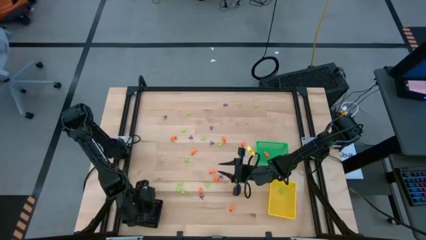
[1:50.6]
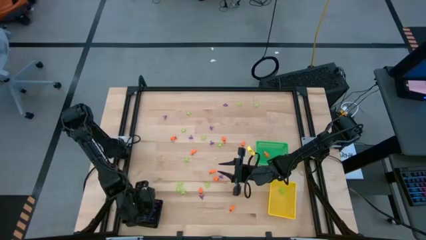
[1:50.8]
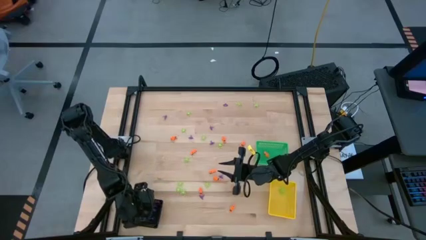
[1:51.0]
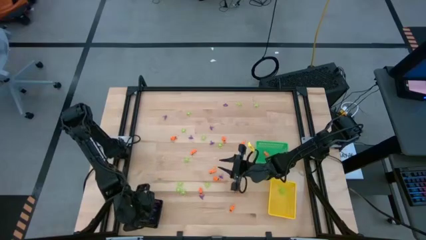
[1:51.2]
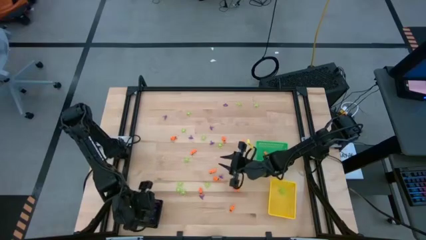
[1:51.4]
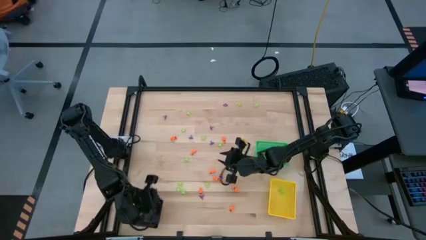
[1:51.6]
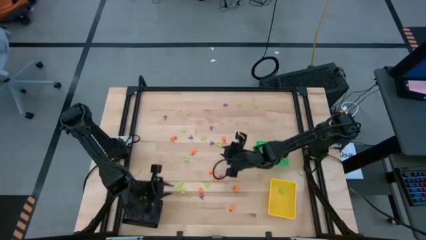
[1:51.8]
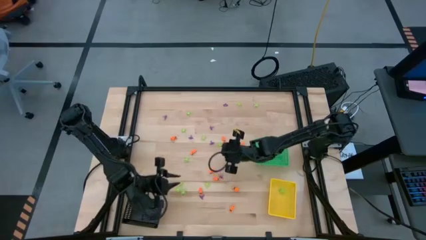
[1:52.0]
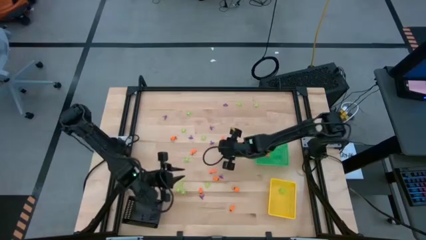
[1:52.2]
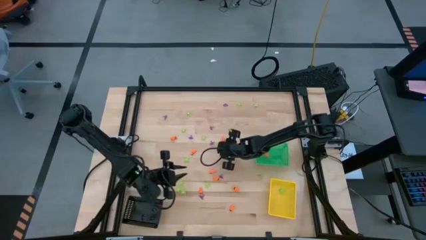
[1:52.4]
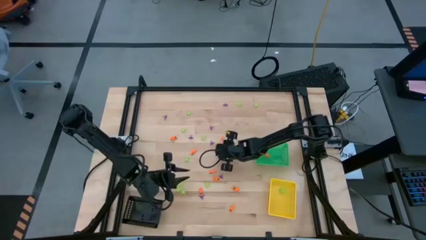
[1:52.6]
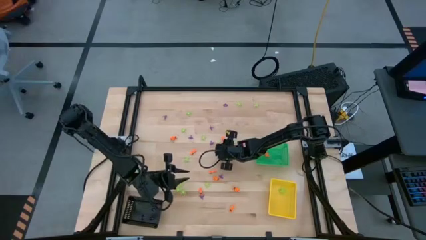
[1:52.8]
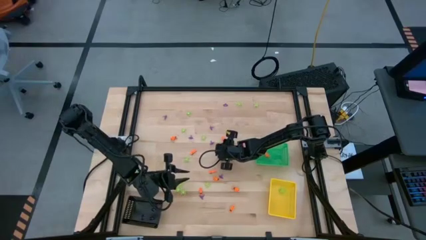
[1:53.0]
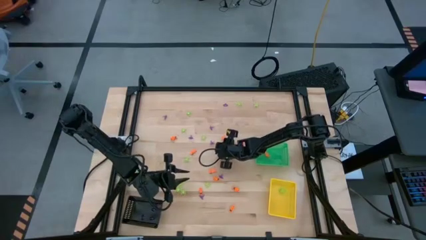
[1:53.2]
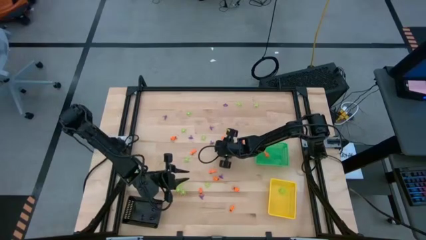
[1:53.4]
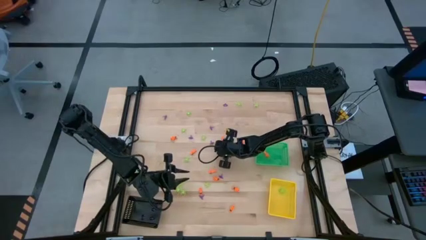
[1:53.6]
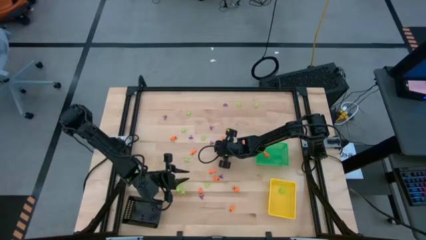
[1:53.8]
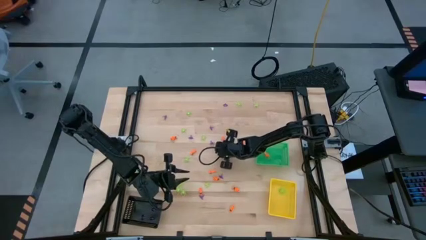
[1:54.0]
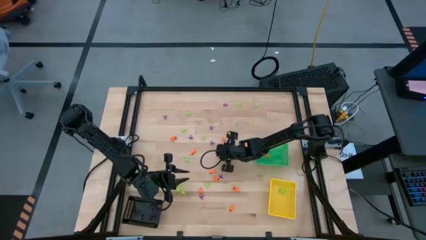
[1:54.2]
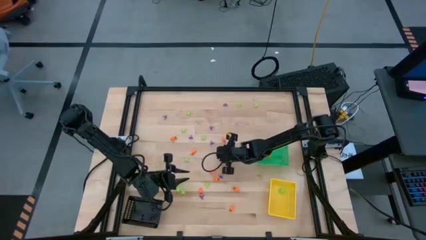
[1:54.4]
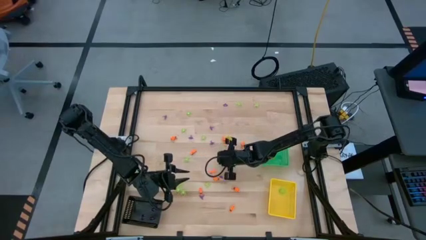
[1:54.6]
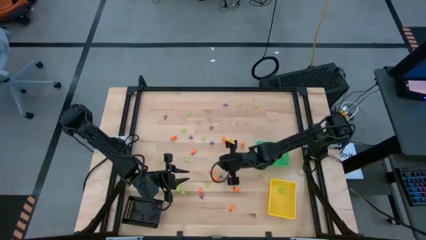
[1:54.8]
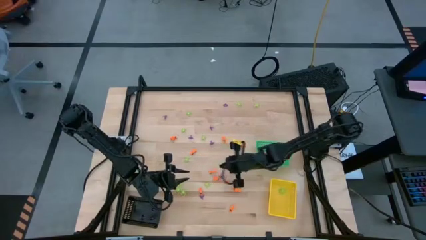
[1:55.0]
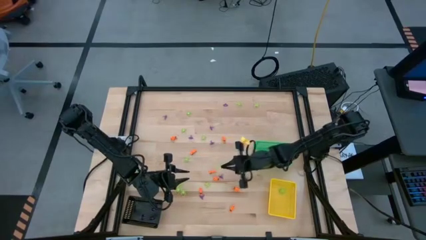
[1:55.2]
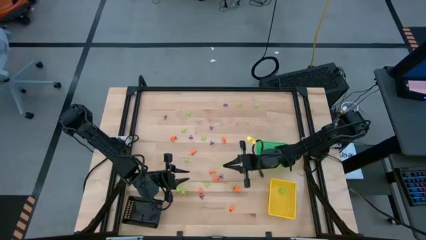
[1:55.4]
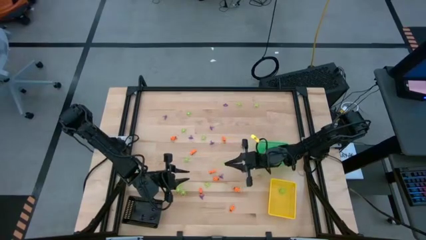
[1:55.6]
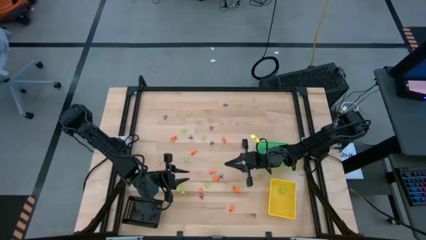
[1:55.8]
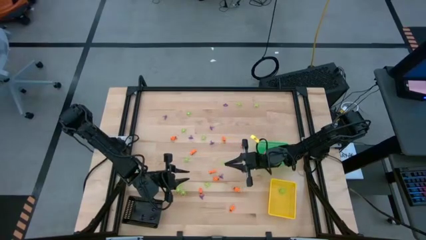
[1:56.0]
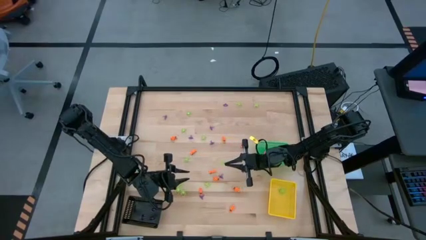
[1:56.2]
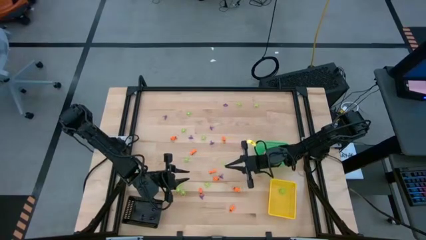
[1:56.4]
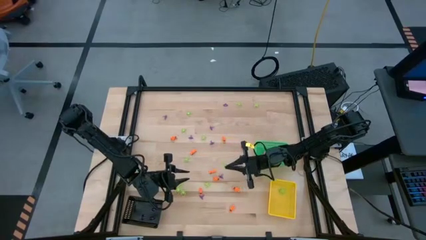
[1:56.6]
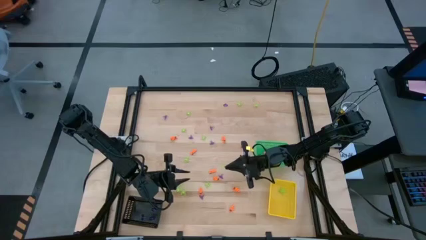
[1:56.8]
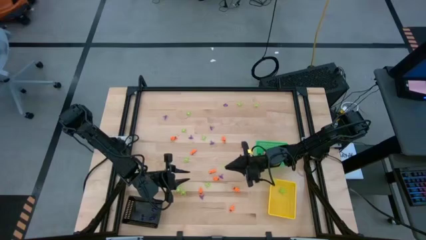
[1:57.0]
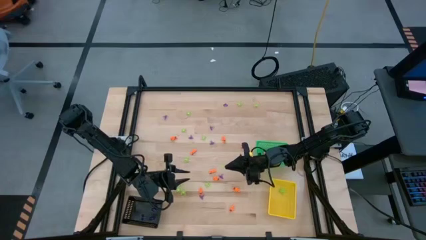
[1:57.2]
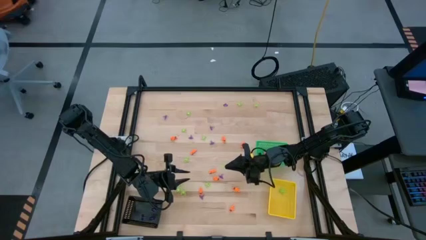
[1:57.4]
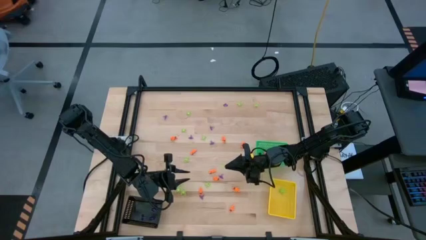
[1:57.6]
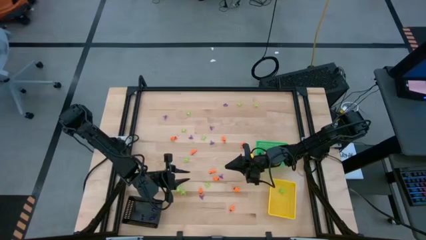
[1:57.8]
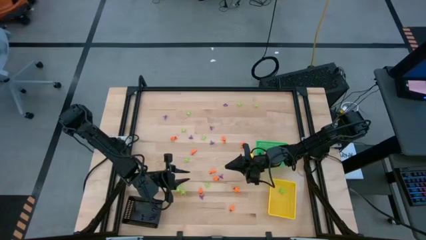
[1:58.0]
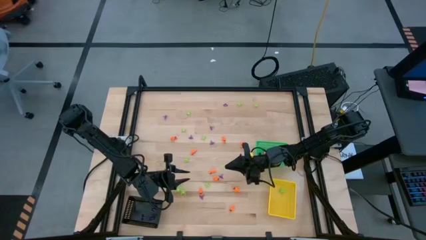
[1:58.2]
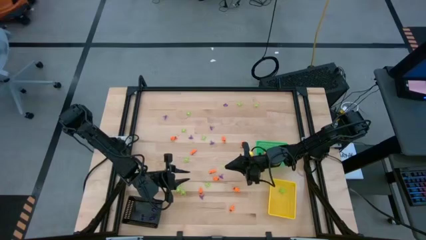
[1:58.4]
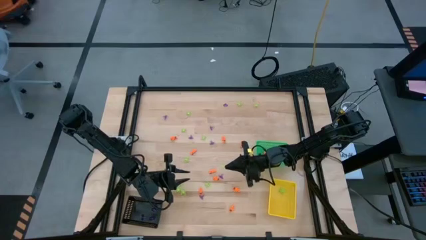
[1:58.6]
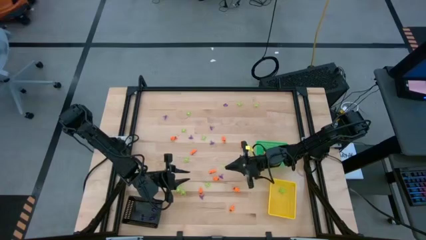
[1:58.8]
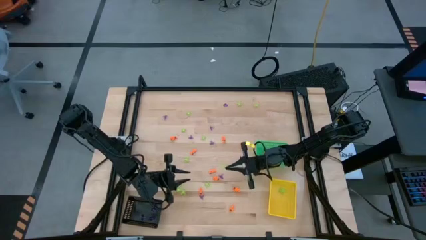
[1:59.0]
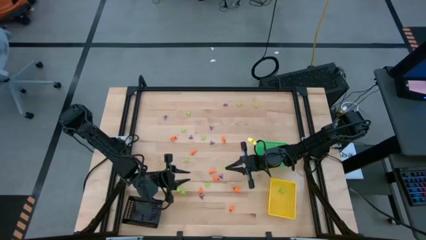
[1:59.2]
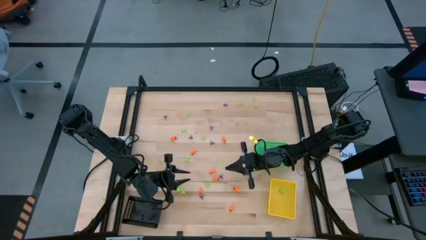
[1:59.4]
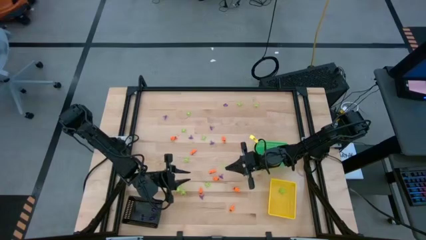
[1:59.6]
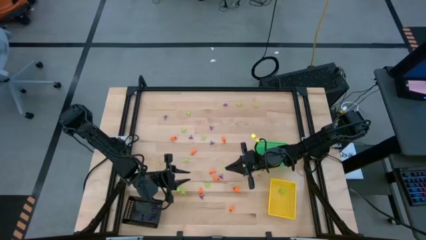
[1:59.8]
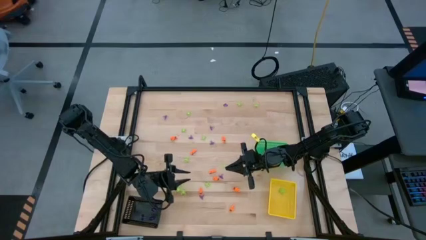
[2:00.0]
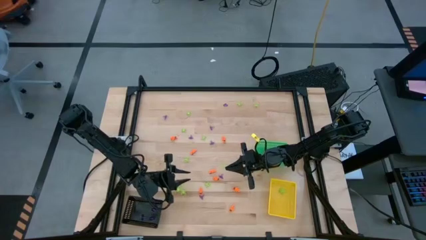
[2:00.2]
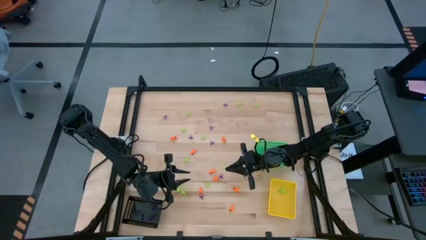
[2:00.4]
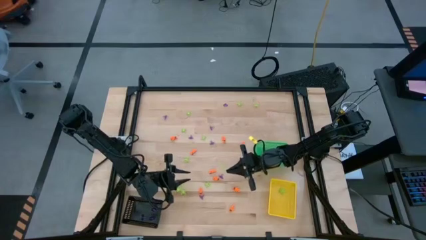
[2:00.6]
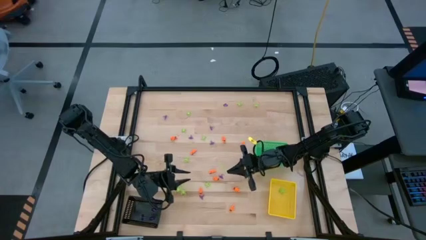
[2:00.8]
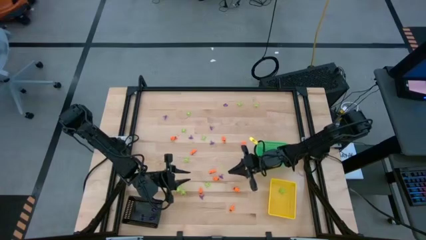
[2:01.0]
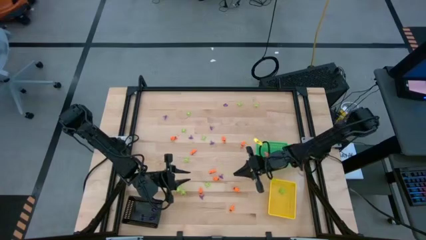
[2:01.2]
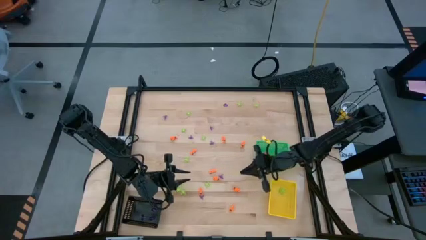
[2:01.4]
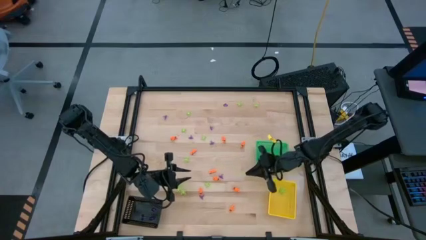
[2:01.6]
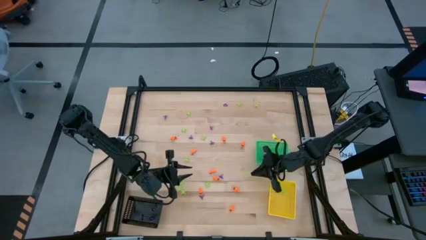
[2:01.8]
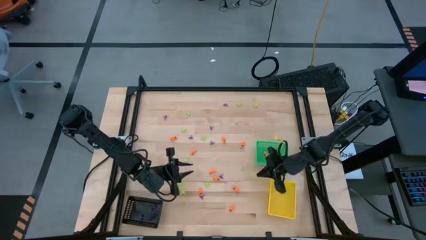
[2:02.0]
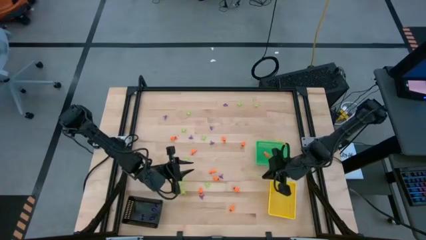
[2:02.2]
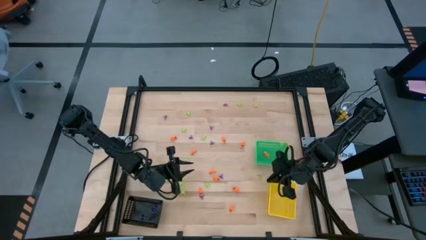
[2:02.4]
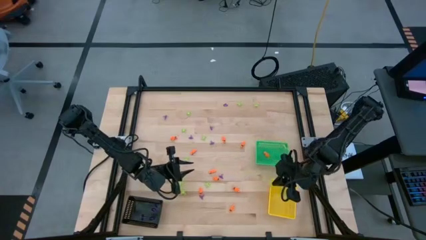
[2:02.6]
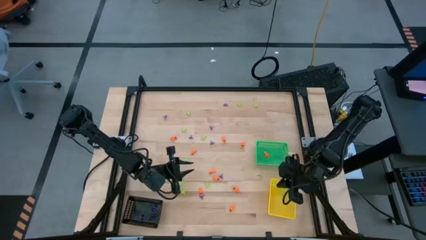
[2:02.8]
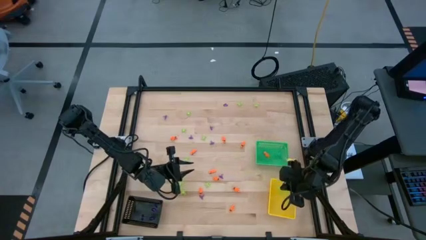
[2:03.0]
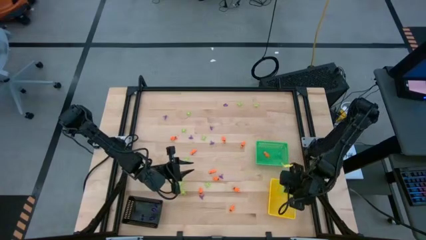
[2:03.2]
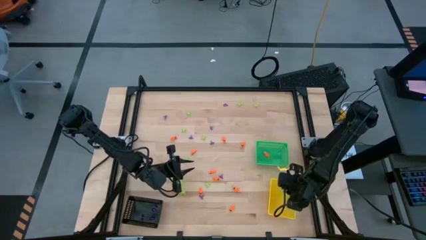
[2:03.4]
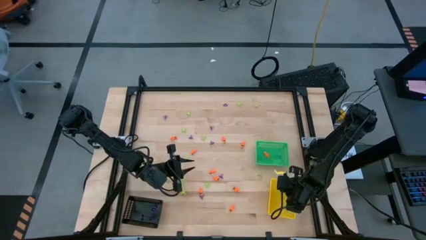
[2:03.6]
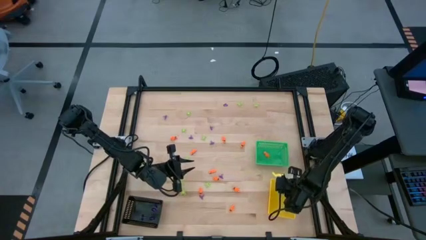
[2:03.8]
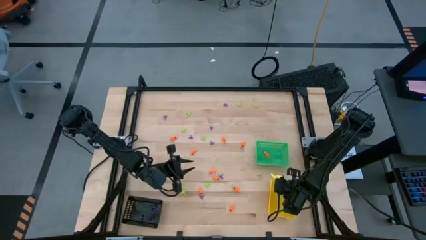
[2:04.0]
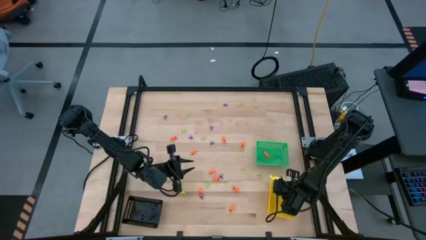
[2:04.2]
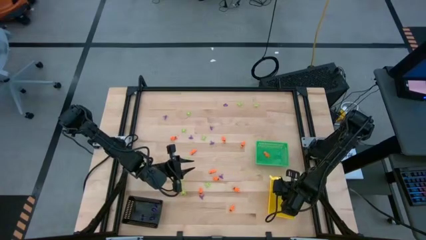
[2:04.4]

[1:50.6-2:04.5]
Task: Sort Halloween decoration
Put the green spider toy into the yellow bin
